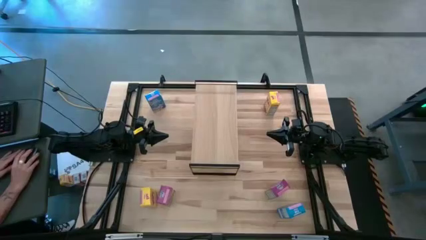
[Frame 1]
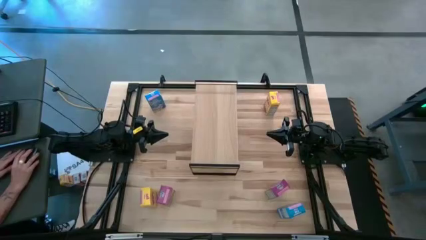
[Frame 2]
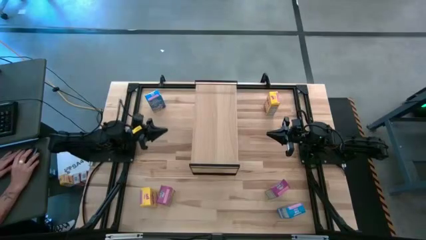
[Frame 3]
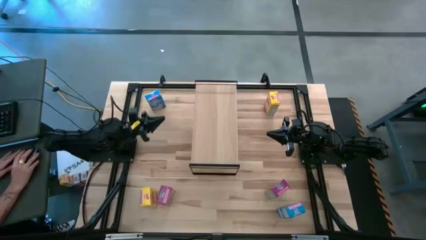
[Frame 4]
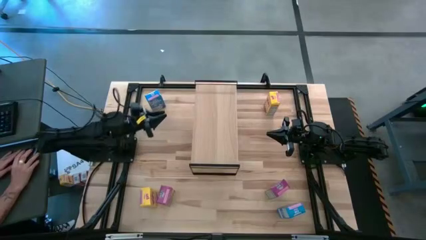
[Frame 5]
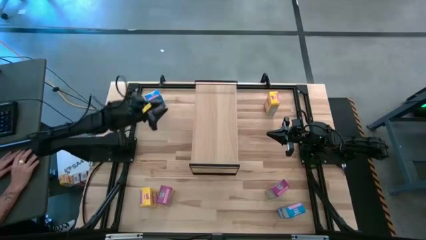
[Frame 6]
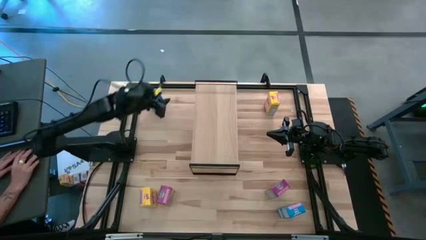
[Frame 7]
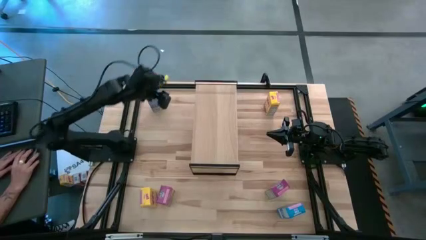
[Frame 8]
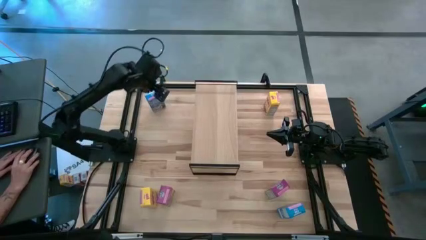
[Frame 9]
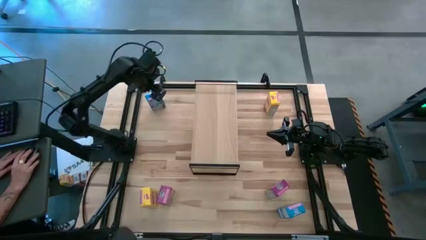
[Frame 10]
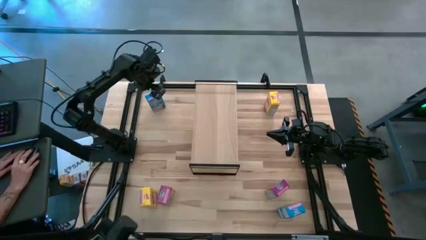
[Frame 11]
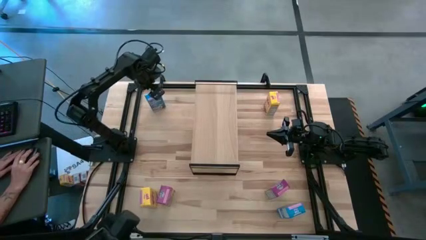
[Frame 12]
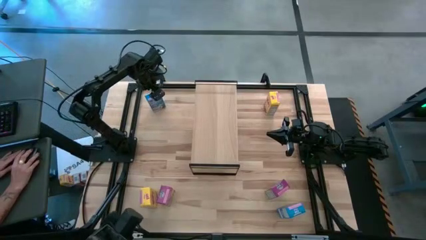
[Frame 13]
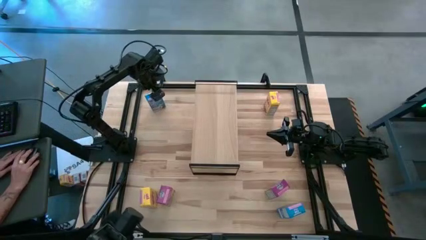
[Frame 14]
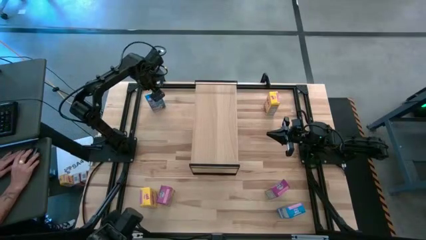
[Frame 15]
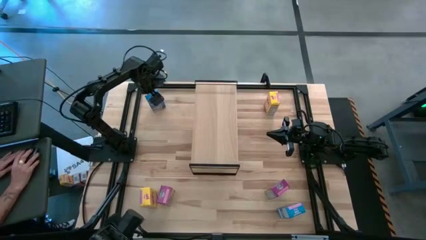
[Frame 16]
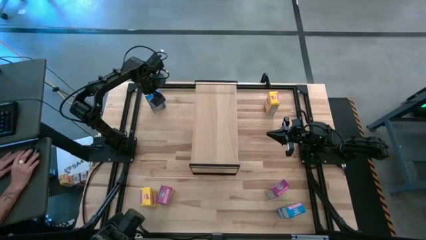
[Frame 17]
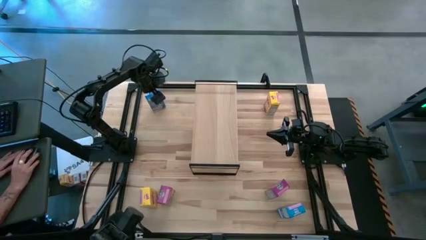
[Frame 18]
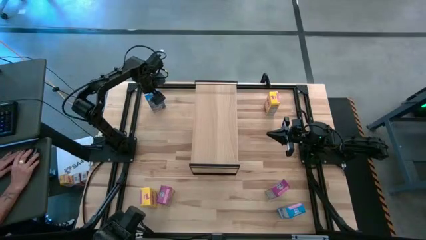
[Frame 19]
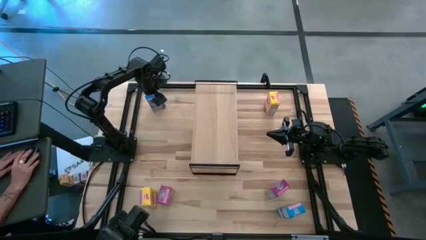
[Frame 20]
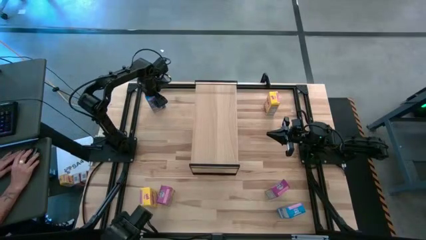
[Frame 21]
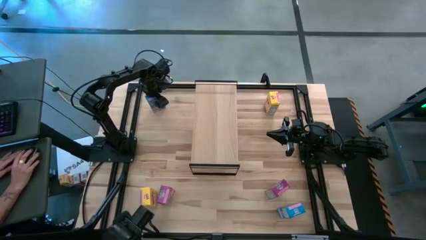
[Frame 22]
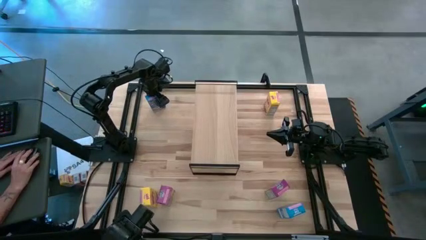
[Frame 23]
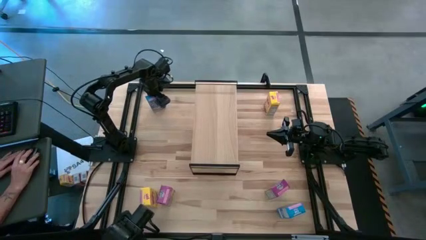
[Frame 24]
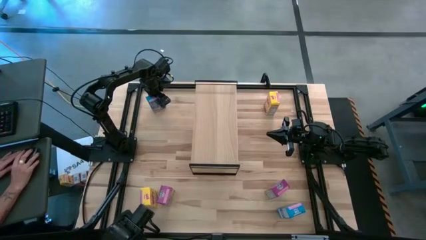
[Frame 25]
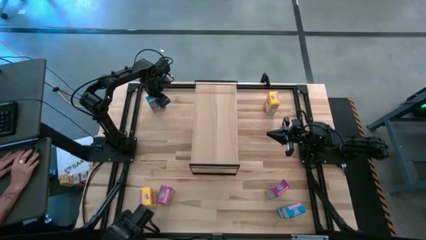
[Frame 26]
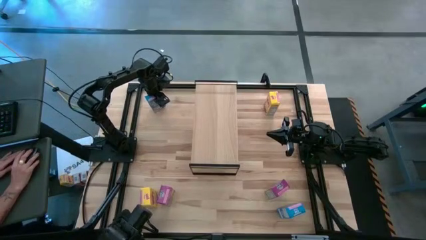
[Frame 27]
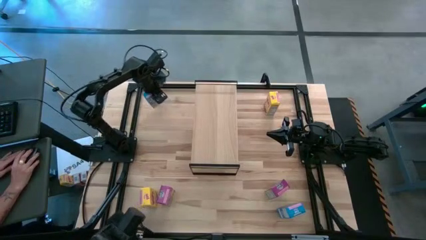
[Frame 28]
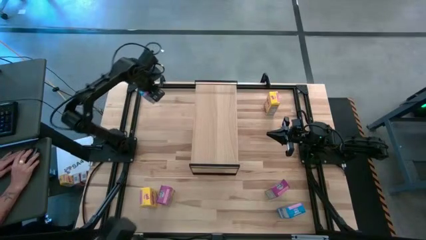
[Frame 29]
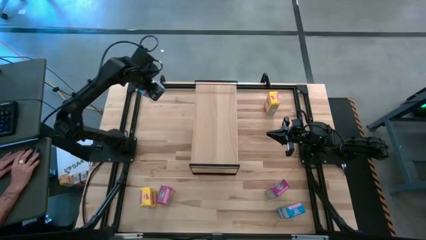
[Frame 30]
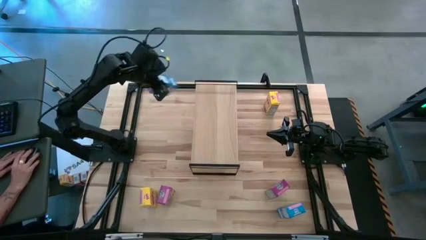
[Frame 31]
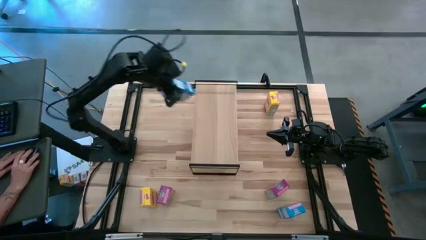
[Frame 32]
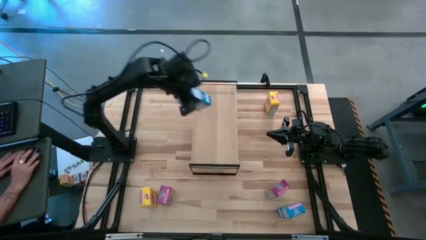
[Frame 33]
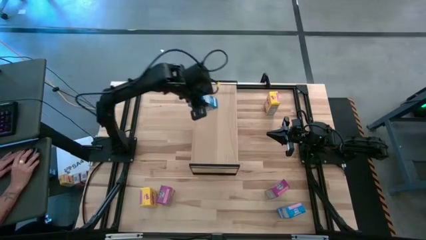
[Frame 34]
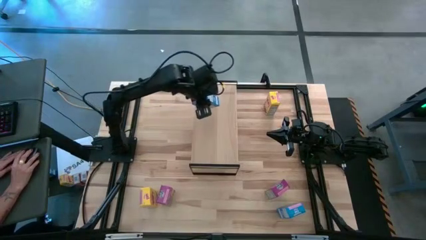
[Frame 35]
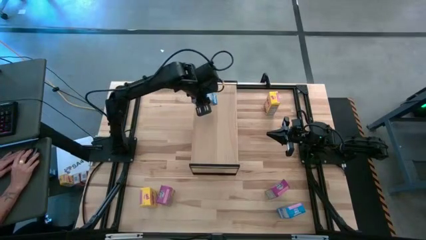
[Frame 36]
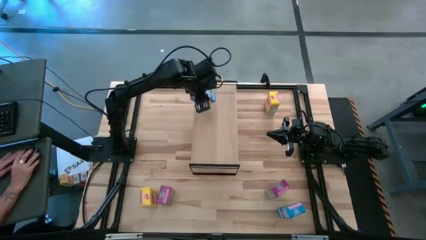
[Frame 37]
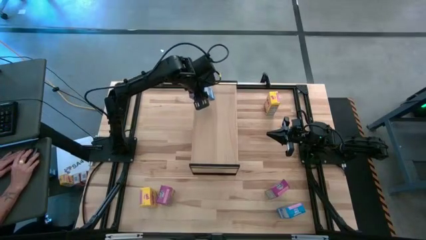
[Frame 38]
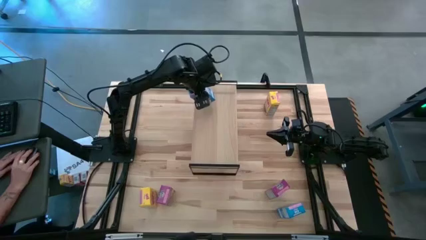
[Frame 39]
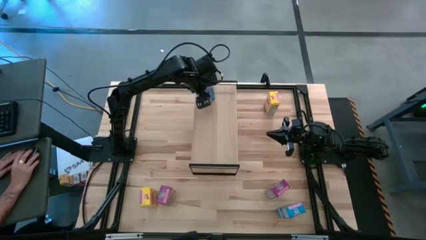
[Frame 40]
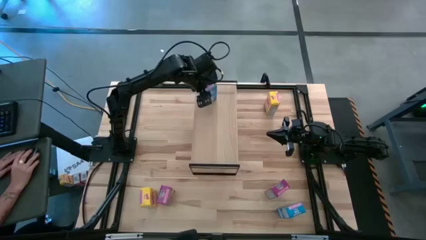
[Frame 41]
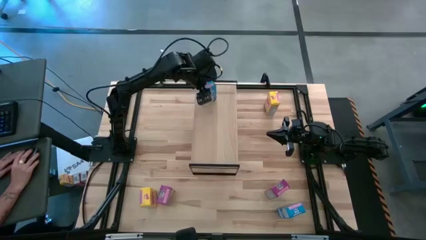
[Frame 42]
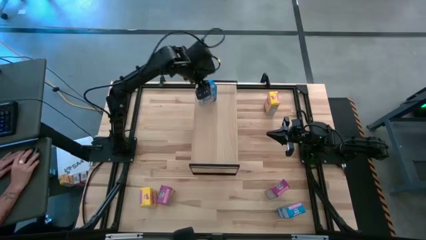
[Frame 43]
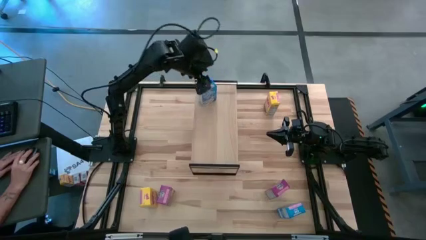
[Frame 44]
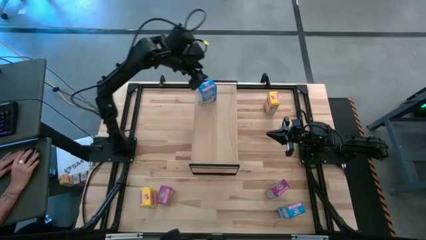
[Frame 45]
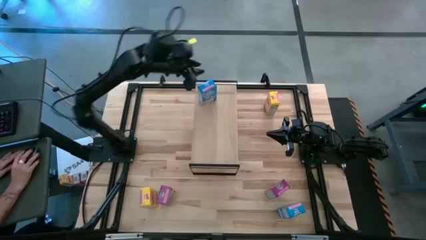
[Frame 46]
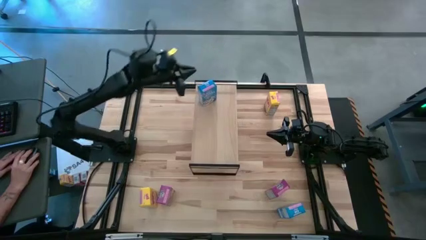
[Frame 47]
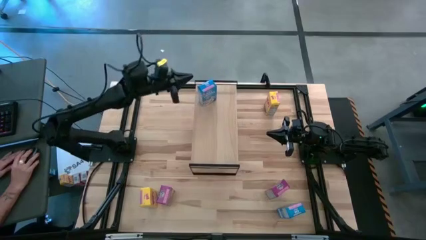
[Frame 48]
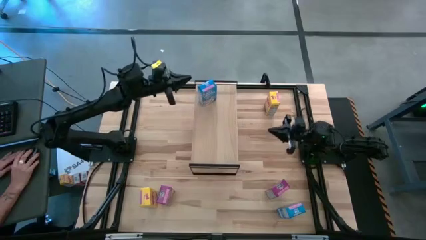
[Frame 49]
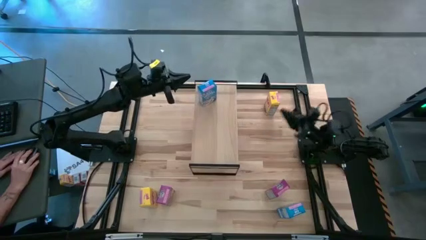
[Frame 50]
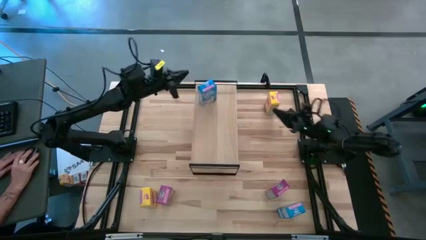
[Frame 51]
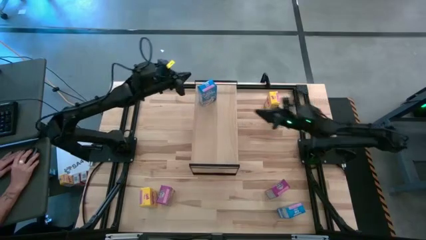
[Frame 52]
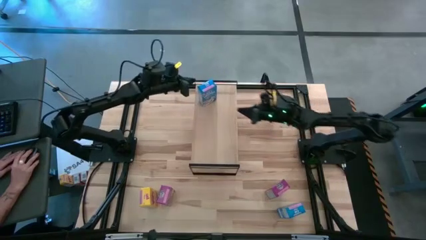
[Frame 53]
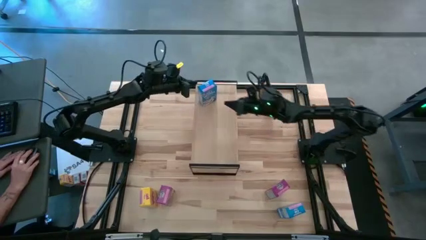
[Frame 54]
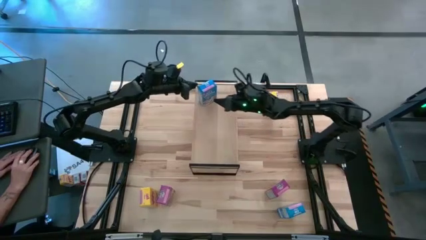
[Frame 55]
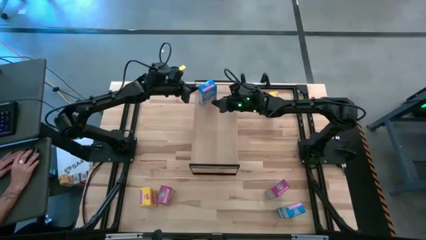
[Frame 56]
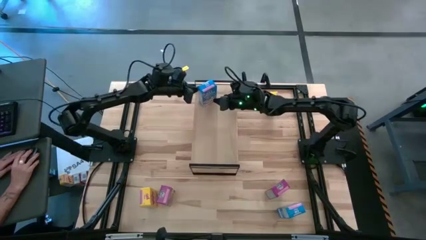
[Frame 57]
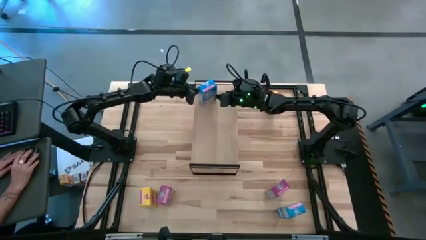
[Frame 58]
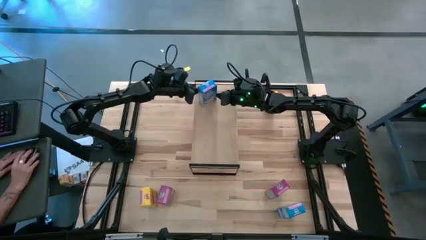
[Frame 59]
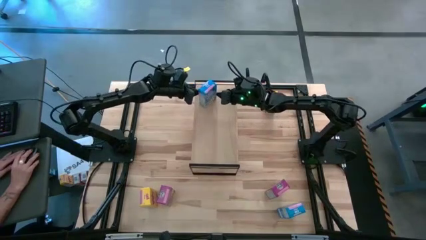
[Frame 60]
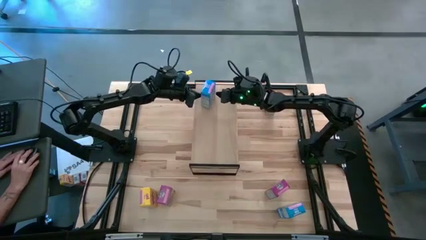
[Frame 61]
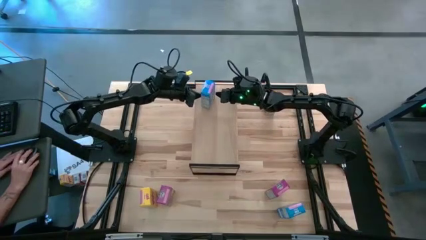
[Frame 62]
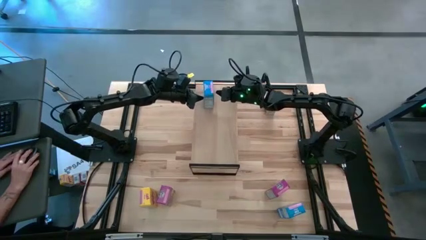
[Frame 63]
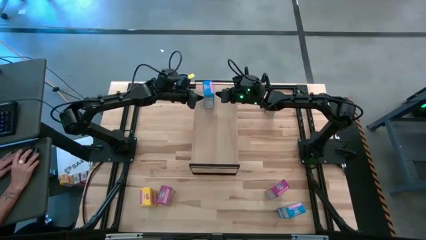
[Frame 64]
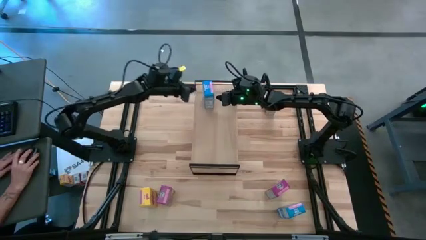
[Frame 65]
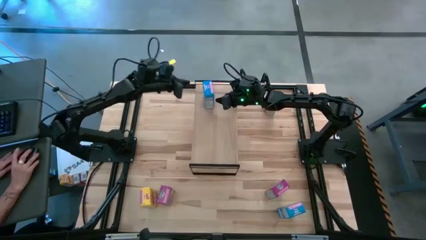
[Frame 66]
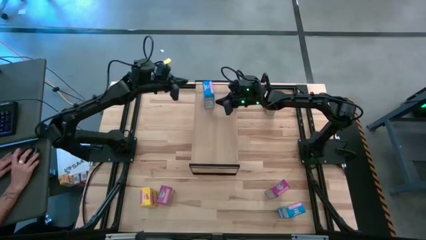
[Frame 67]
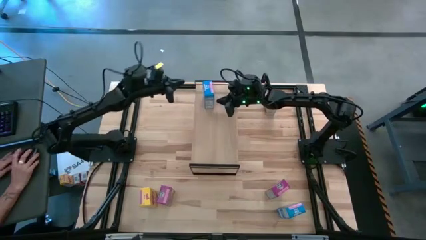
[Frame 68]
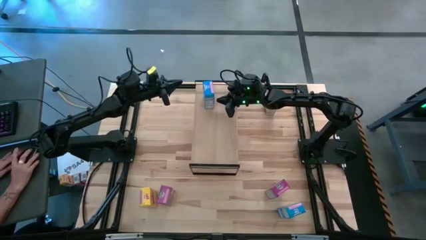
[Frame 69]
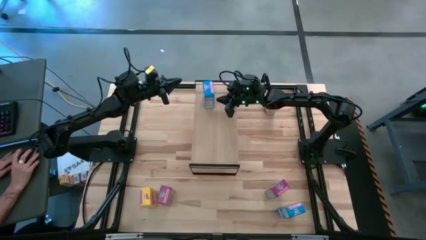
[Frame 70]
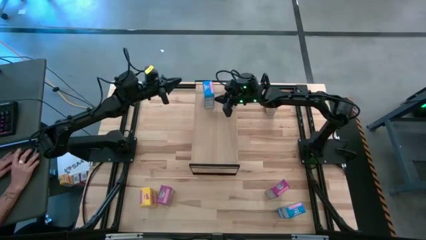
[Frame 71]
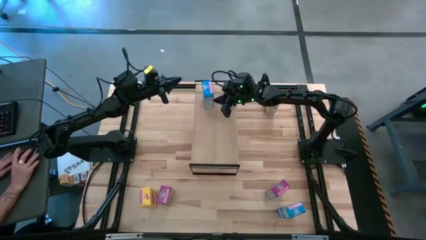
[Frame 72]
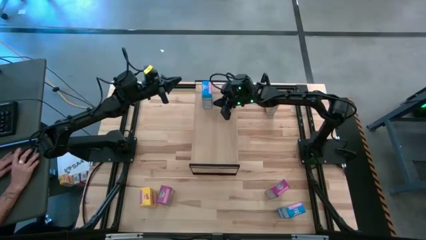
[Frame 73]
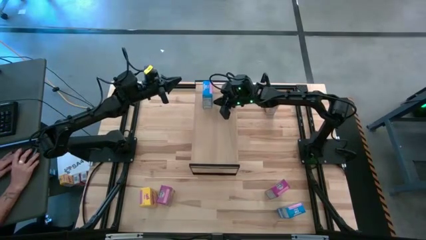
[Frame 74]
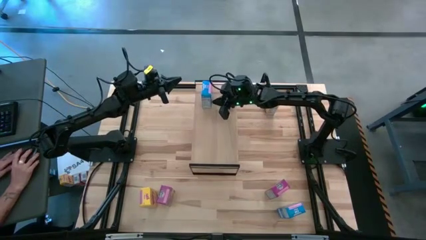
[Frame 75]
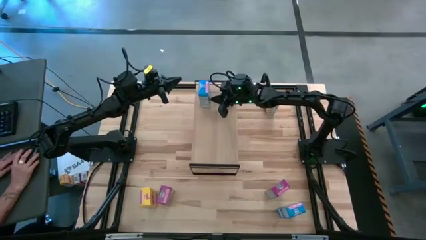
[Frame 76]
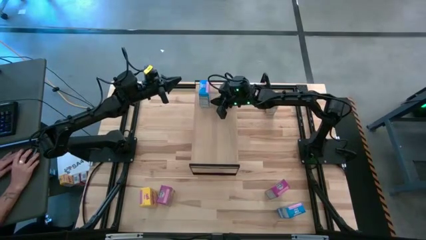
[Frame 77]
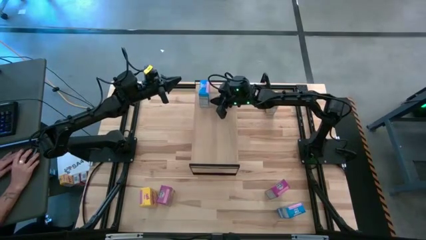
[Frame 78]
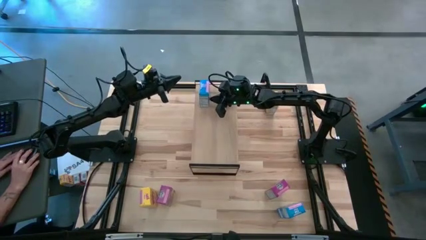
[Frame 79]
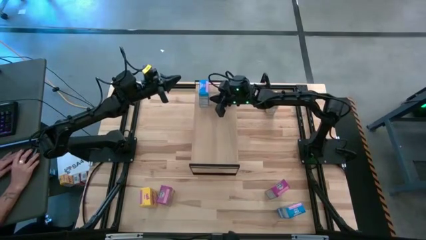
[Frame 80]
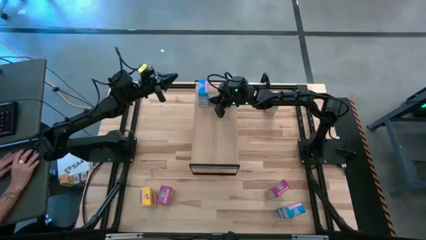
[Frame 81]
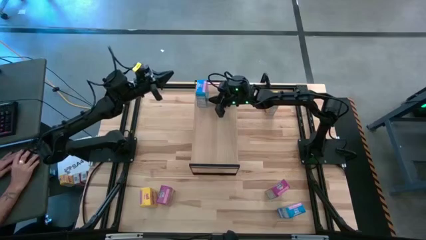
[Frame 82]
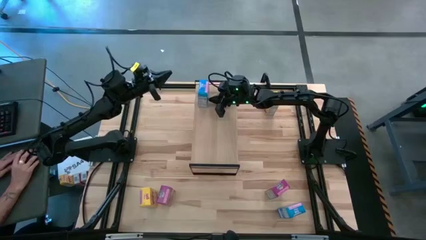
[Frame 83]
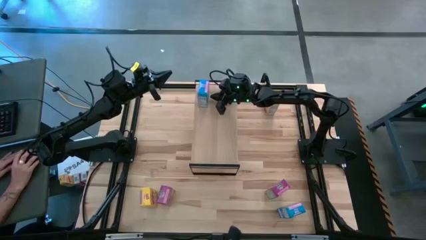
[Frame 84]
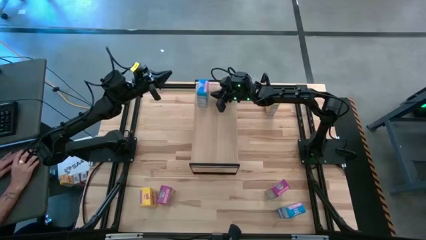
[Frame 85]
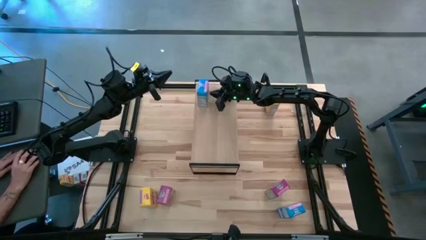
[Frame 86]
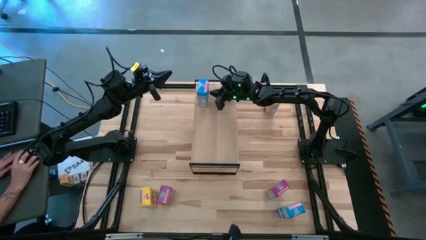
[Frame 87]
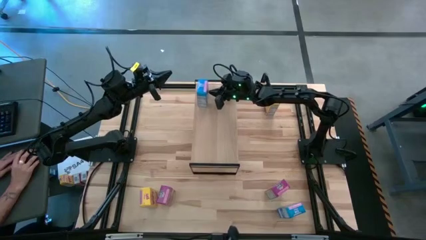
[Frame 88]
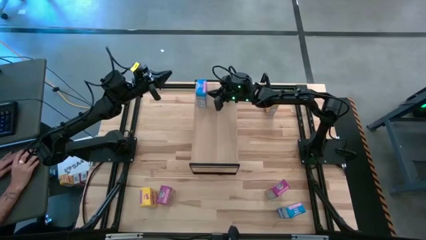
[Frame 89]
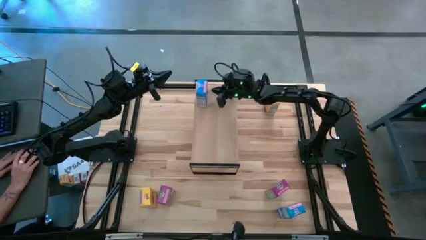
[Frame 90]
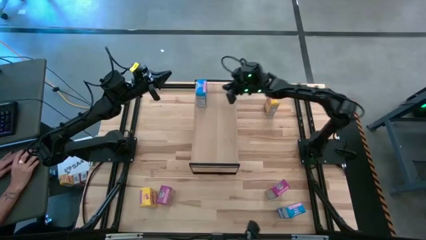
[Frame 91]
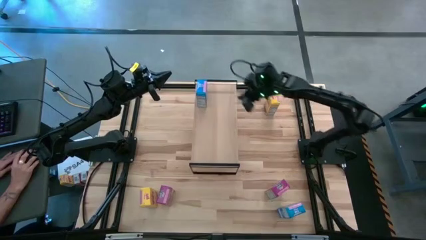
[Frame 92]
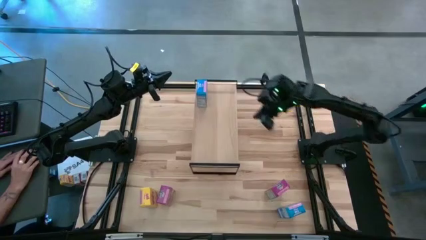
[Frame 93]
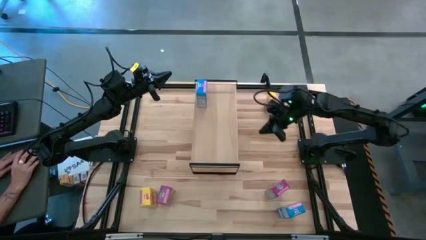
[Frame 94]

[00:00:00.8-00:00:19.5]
Task: Stack cereal on shelf
Put the top blue cereal box on the shelf
